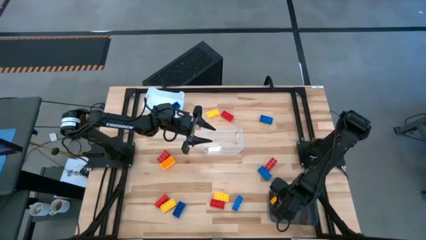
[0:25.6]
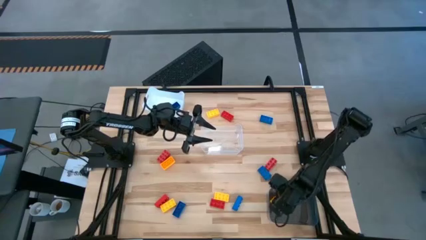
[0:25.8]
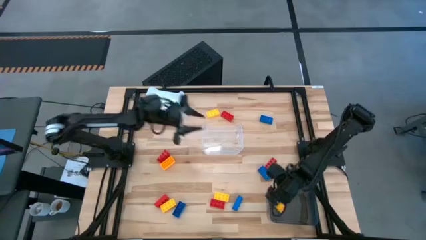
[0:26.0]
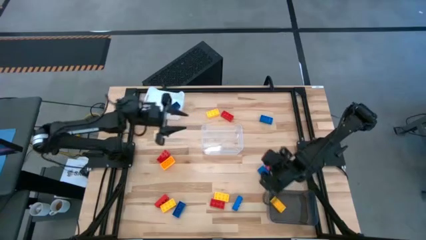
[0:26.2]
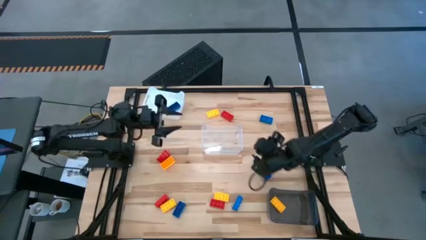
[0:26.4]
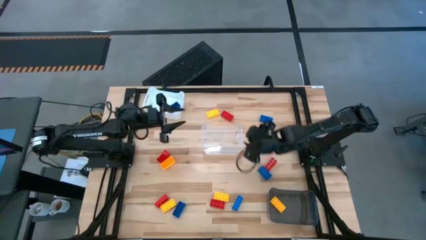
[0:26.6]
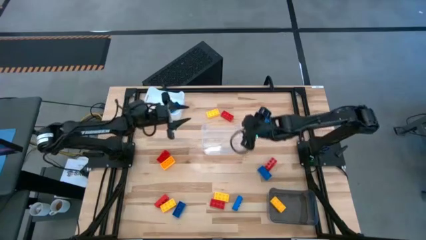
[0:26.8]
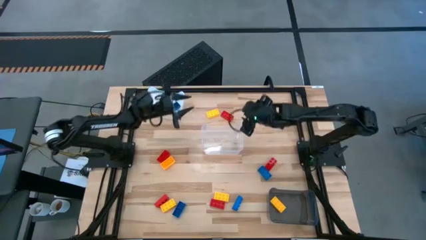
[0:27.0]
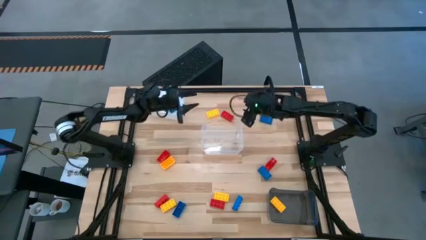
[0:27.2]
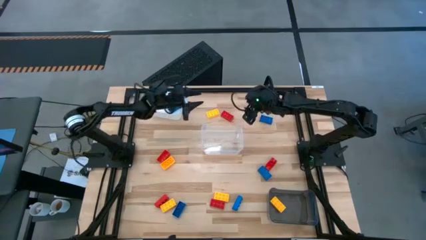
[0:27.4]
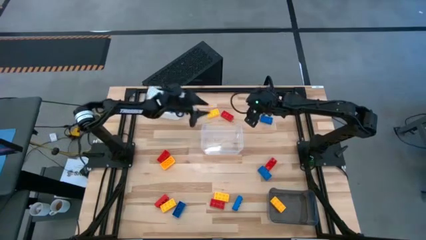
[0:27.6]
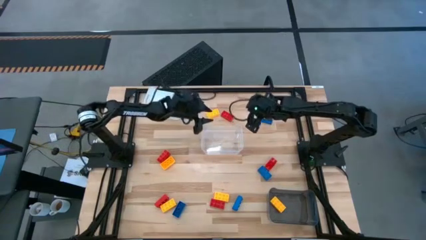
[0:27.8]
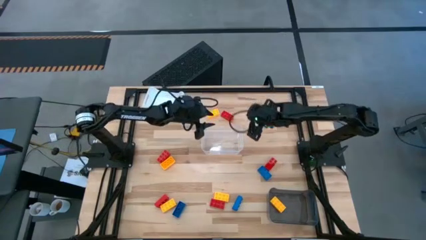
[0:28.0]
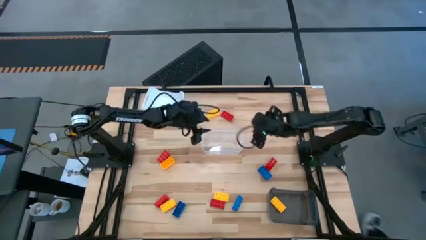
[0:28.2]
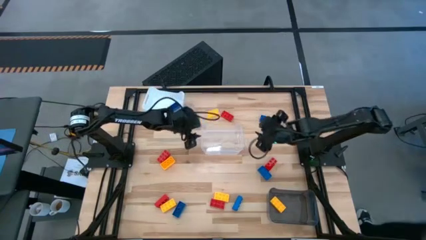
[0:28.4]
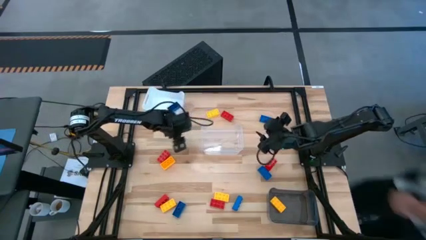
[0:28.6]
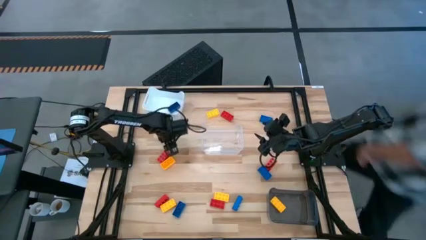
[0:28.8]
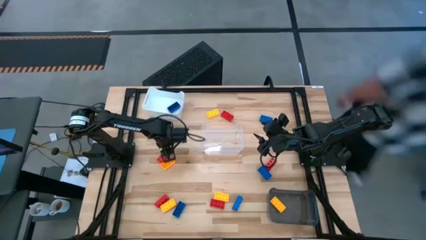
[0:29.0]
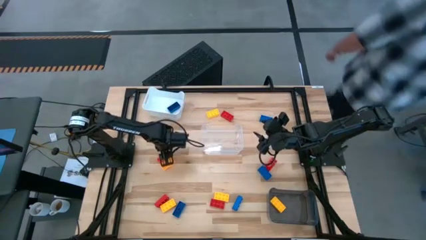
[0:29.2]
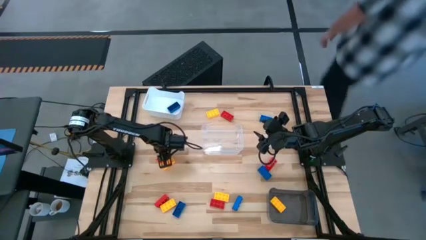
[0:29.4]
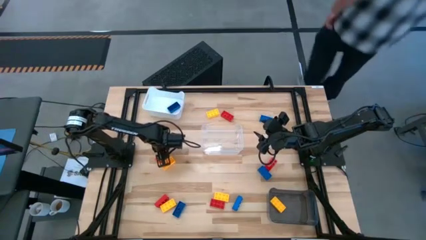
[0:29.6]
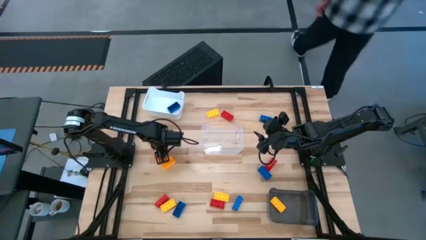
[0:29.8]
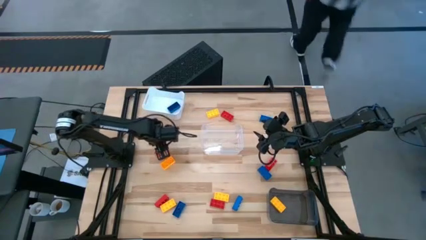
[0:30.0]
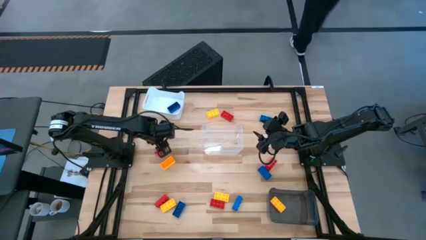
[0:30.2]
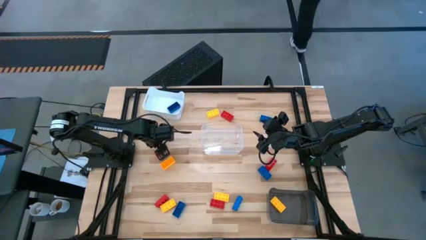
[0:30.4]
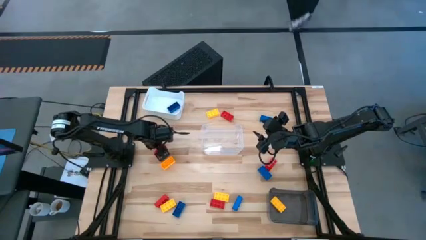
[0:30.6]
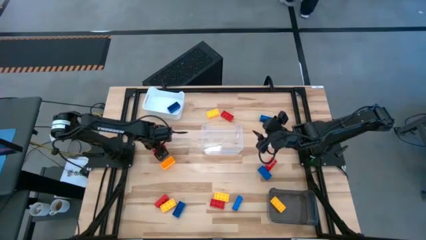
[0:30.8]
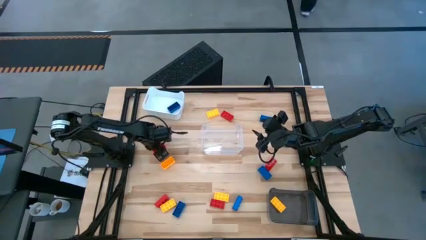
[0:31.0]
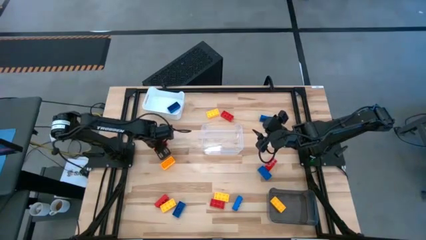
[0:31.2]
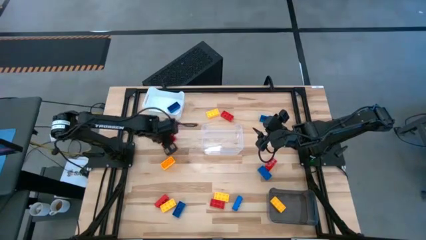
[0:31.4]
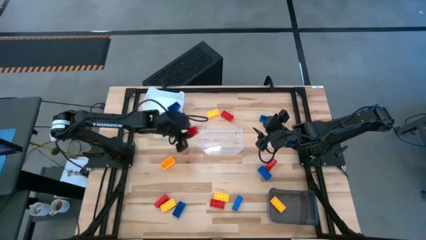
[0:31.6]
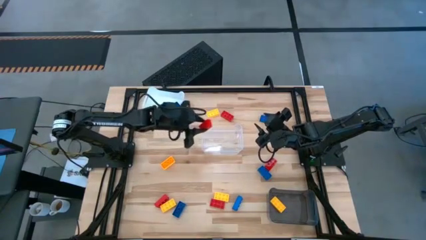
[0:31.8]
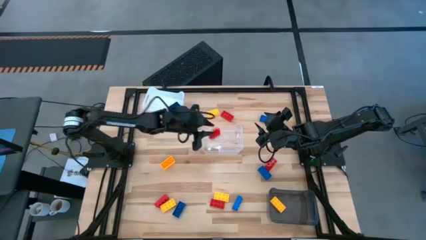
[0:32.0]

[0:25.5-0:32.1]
Task: Sort & place blocks by color
Put the red game piece into the transparent bin

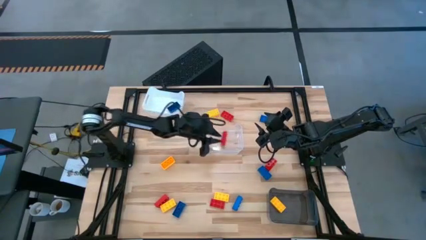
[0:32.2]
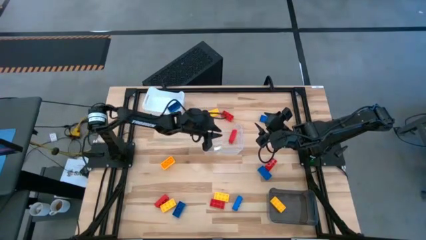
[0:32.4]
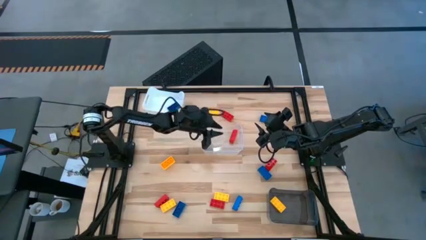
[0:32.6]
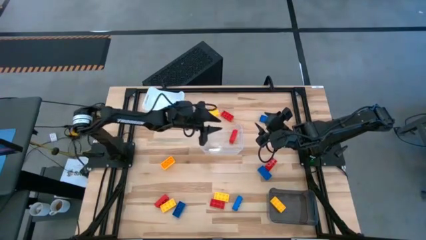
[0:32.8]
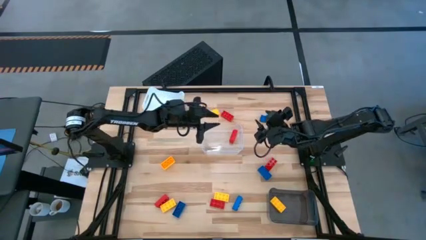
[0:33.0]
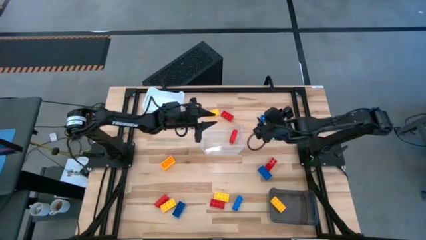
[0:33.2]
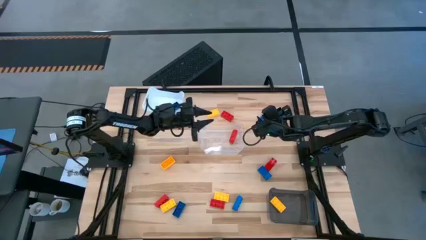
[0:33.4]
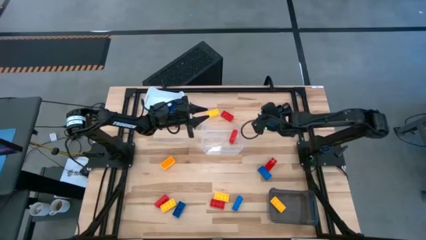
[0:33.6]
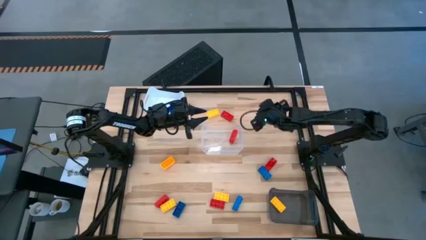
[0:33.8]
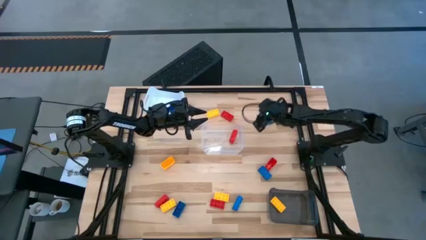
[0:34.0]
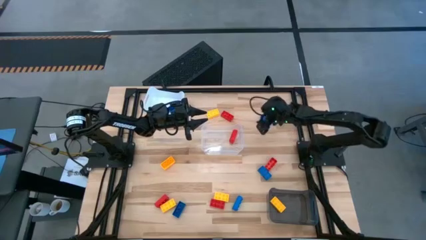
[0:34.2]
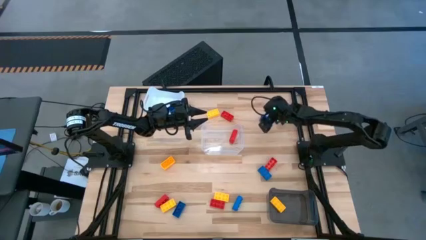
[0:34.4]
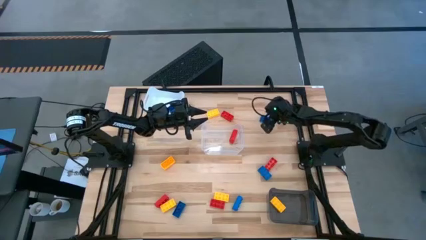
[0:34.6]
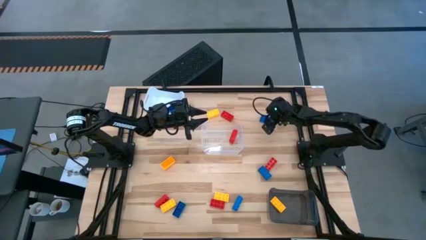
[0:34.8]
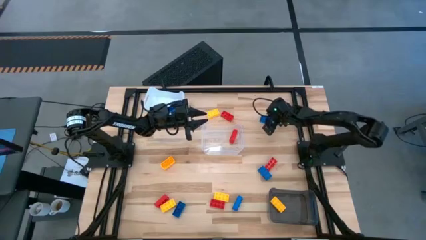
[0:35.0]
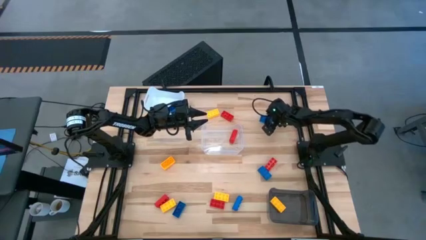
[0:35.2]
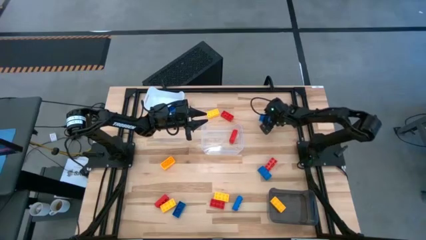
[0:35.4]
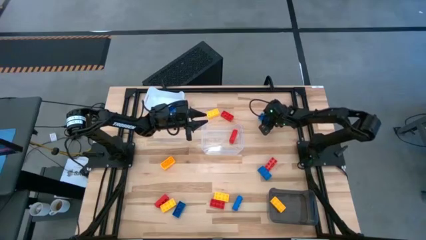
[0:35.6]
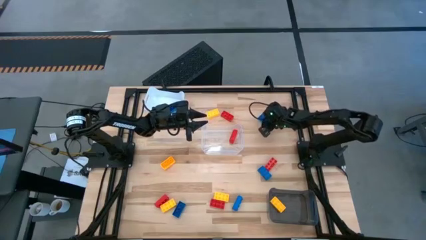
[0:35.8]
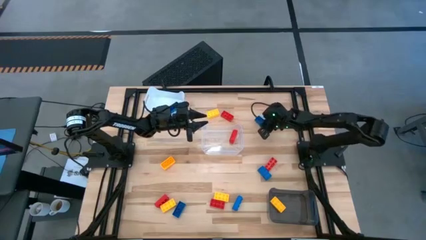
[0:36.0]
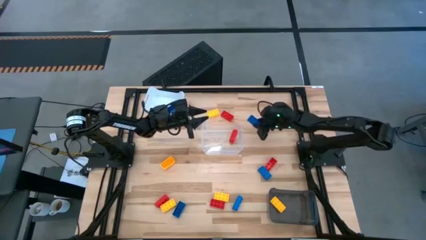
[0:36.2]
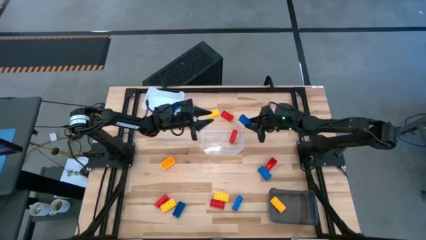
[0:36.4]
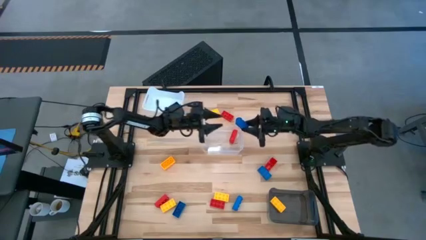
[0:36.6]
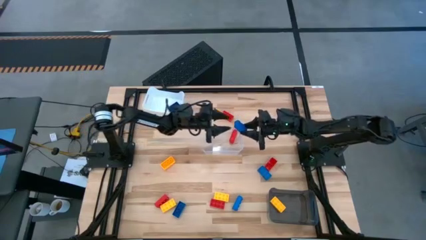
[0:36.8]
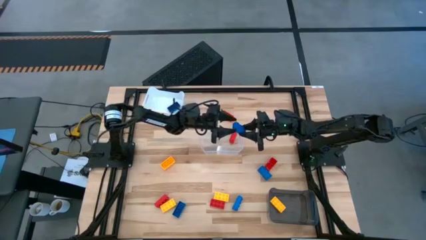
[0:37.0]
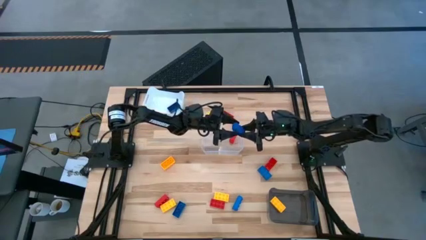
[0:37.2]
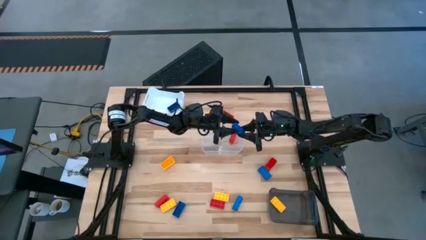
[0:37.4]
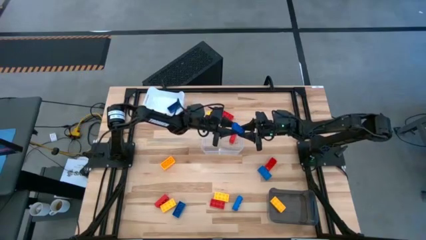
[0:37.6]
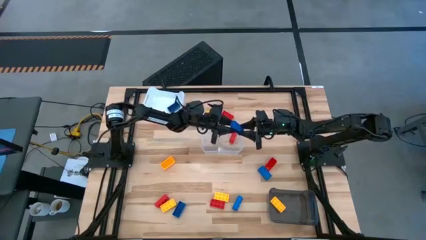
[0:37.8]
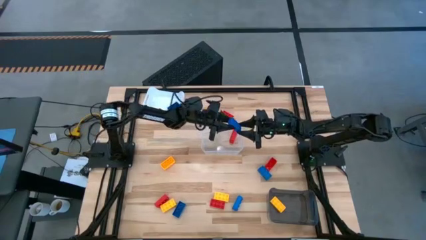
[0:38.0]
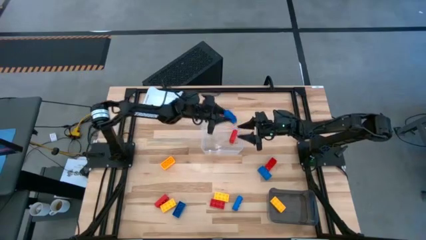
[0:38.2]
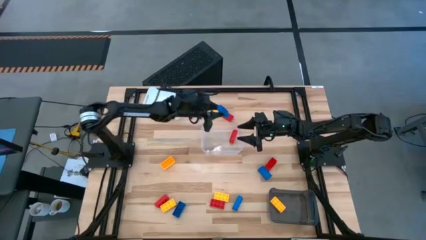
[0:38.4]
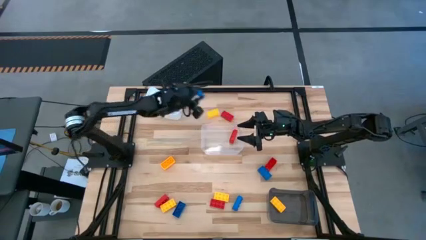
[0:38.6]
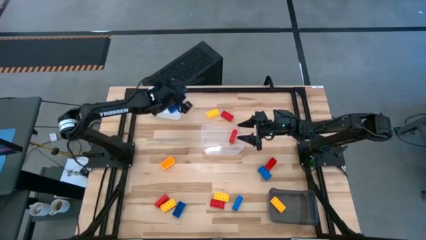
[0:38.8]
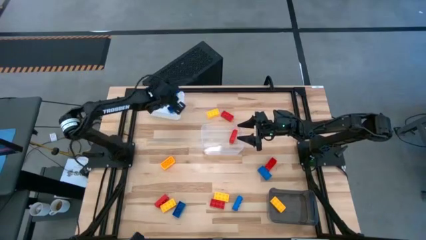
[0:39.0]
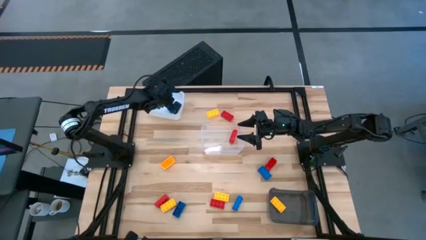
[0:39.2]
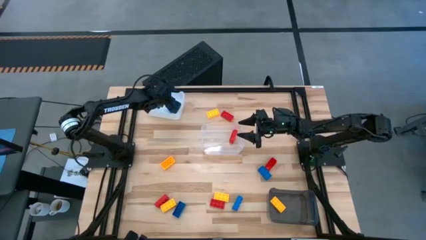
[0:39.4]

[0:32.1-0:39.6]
Put the blue game piece into the white bin
